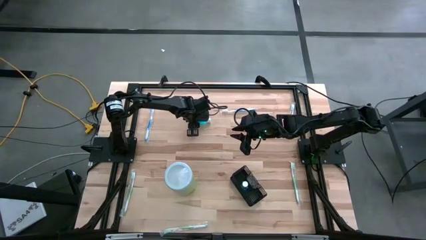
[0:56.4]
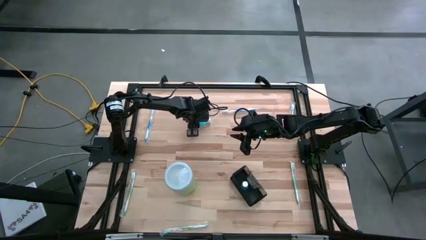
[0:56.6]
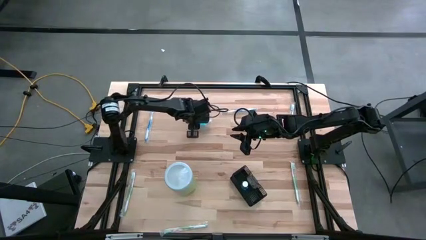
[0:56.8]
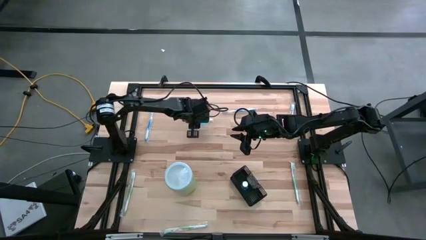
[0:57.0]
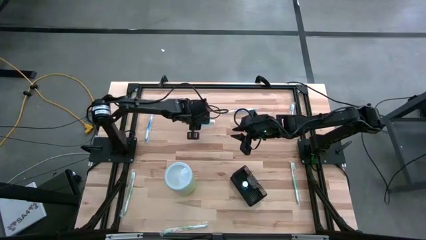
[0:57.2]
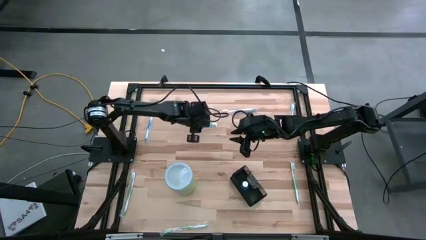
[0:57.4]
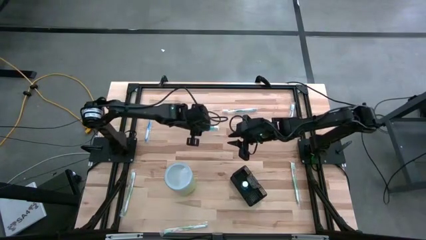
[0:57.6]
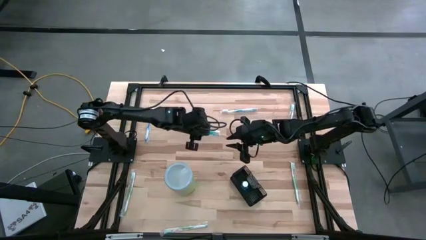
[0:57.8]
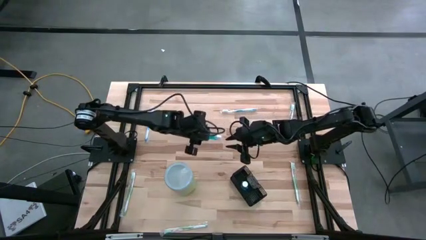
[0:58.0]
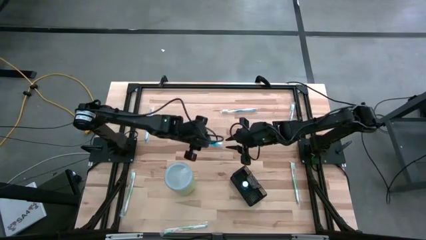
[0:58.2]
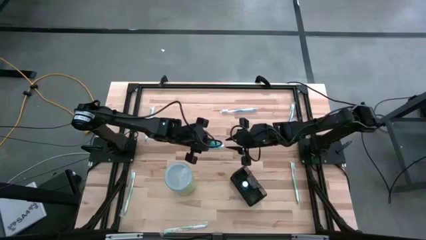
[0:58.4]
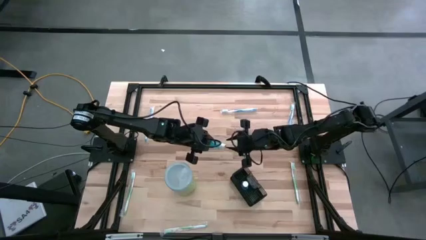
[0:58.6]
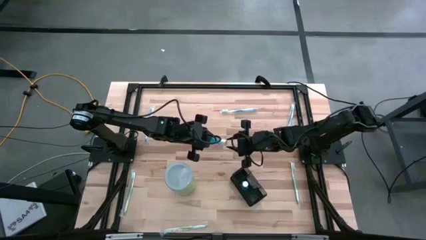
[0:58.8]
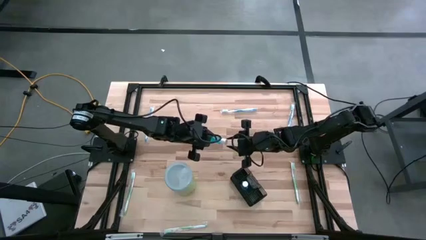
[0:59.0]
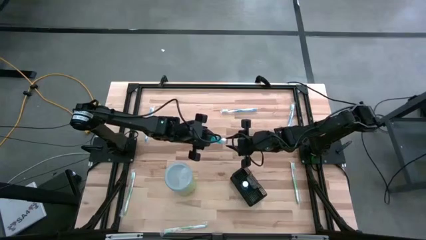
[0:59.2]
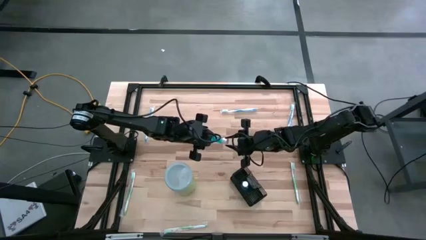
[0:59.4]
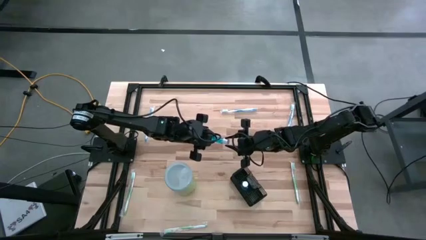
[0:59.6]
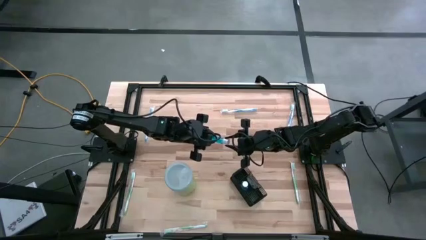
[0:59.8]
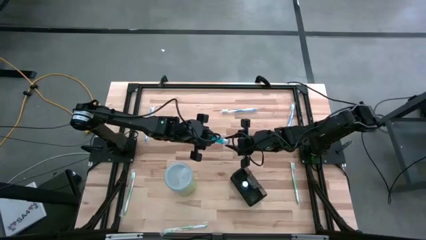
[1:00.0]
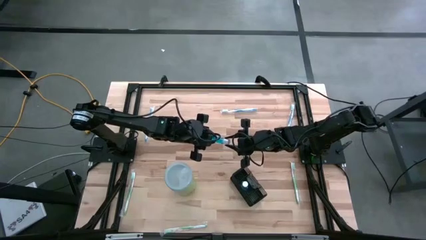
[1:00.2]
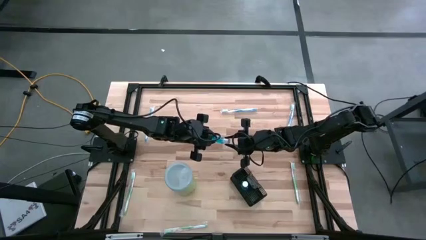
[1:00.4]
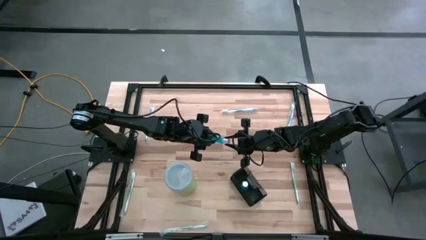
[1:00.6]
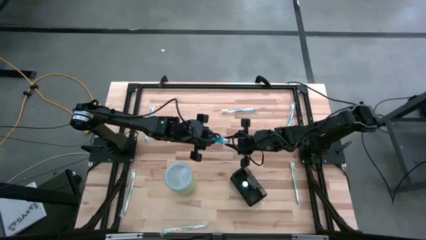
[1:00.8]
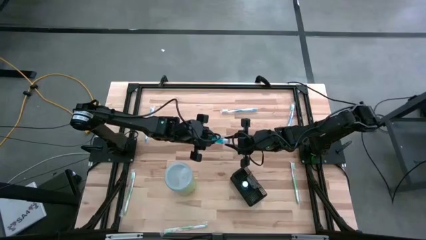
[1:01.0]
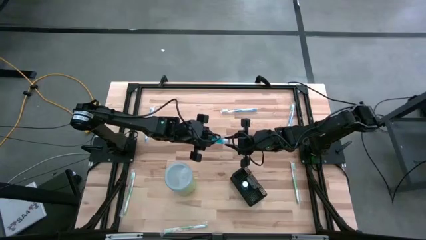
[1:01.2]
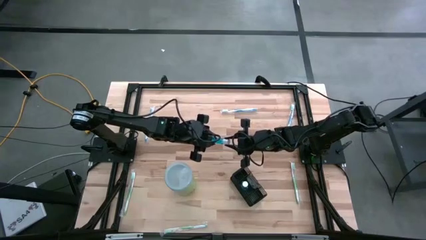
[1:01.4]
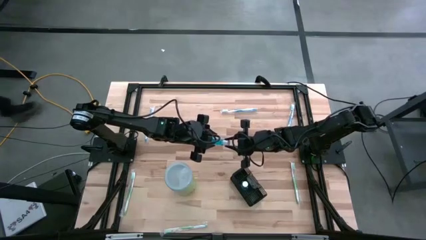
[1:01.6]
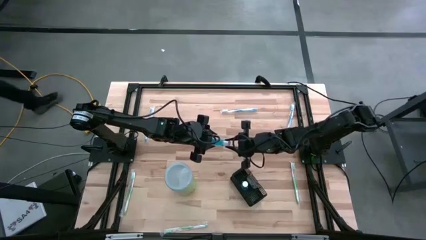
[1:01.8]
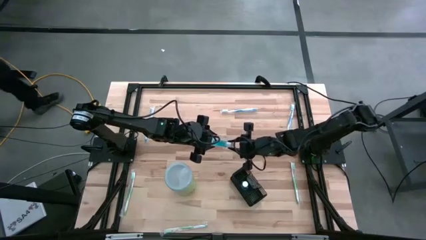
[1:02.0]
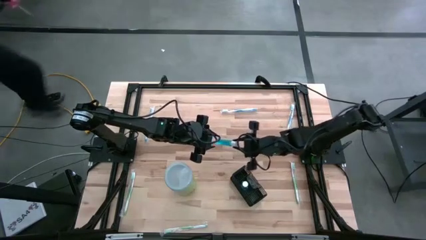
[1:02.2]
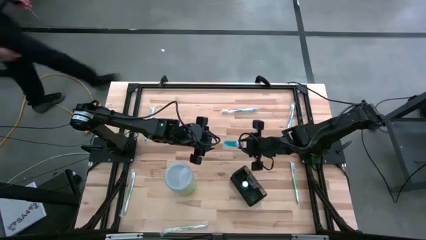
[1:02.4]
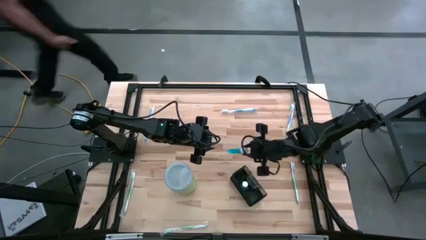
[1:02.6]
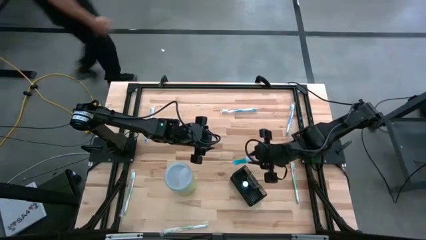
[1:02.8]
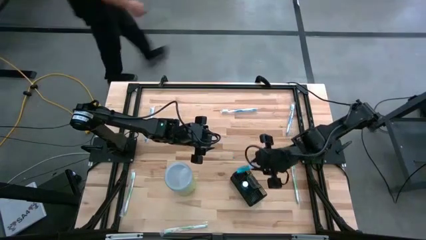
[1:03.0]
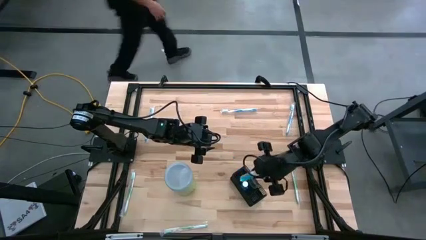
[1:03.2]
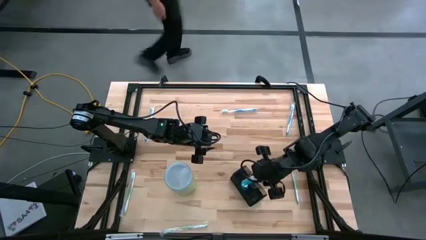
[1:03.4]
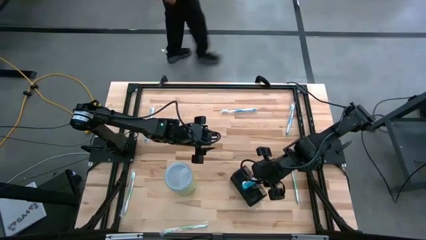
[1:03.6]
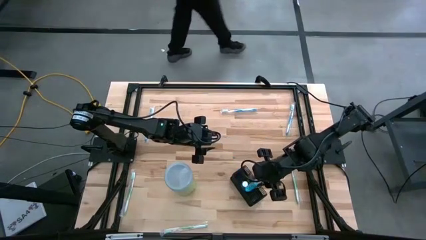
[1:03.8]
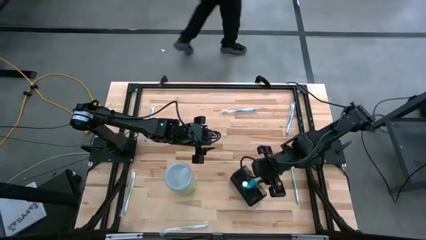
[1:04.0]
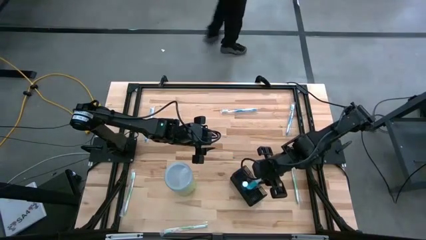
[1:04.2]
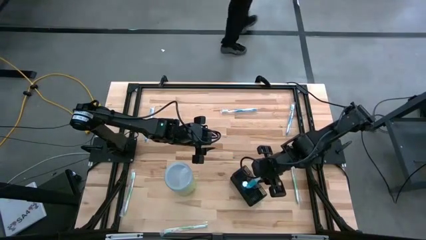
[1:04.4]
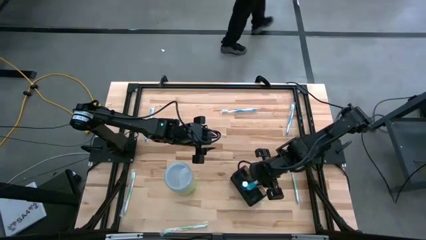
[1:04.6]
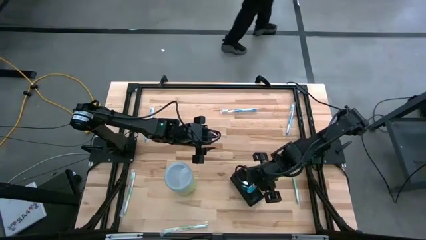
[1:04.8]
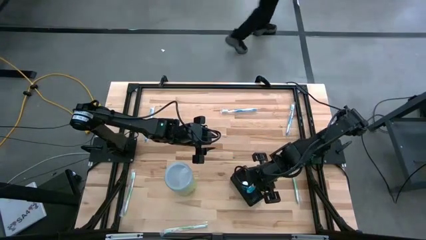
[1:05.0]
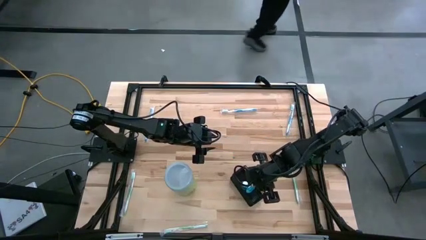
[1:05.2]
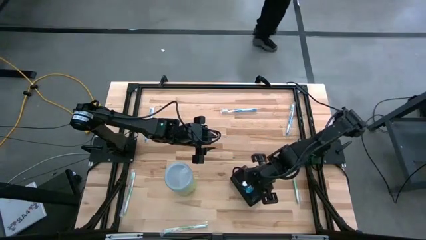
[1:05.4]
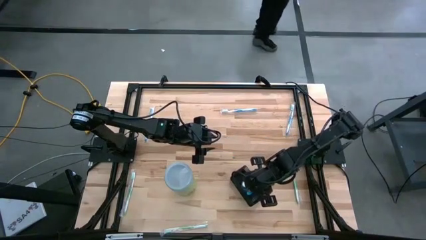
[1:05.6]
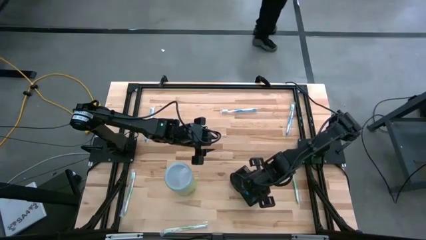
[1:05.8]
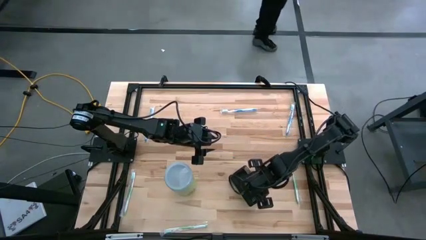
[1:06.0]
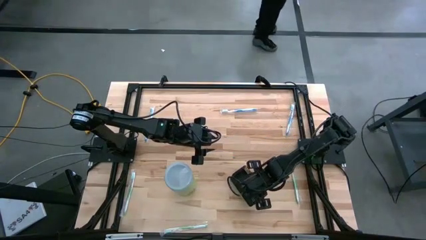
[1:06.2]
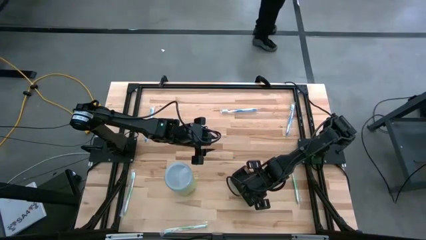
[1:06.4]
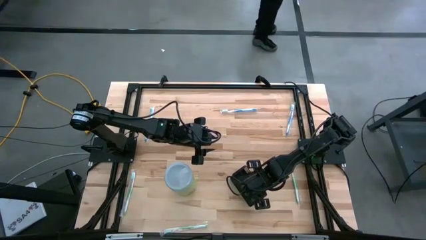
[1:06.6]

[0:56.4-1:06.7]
Task: Pick & Place toothbrushing station
Put the blue mouthwash into the black mesh organizer

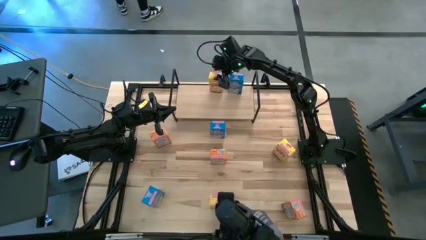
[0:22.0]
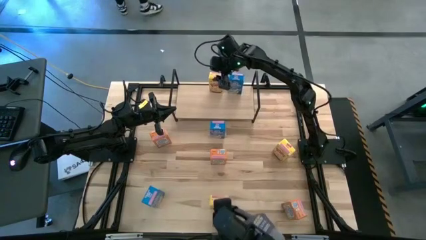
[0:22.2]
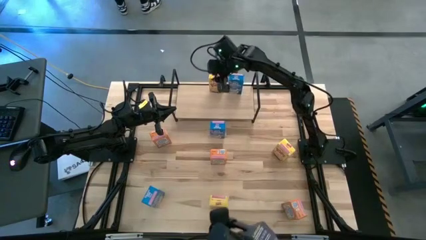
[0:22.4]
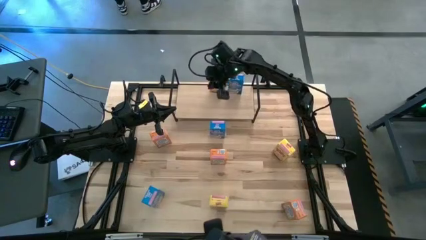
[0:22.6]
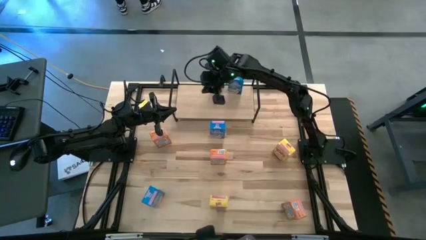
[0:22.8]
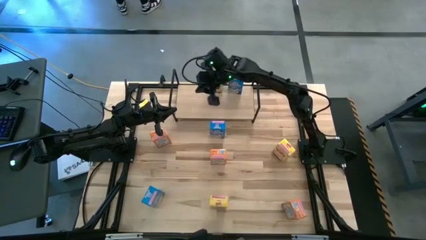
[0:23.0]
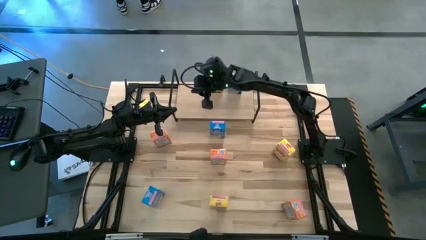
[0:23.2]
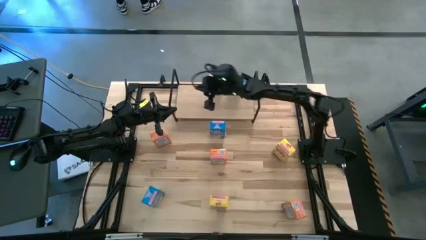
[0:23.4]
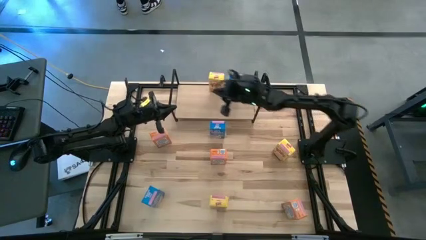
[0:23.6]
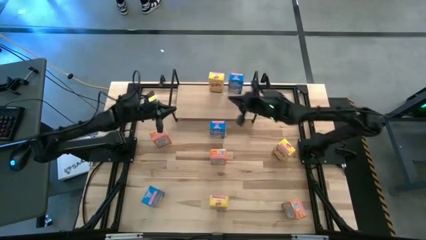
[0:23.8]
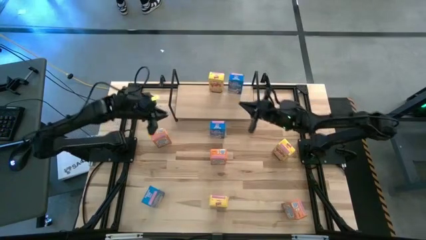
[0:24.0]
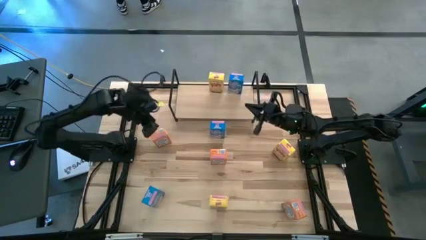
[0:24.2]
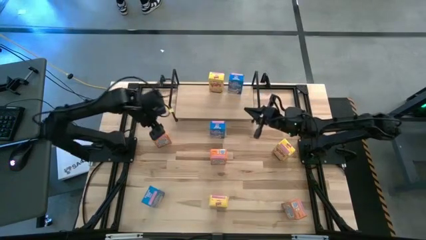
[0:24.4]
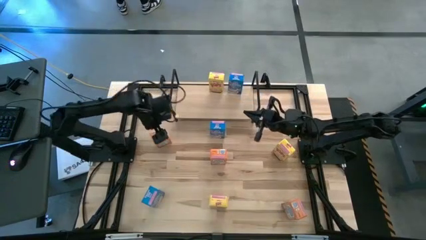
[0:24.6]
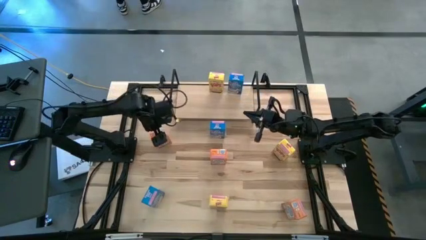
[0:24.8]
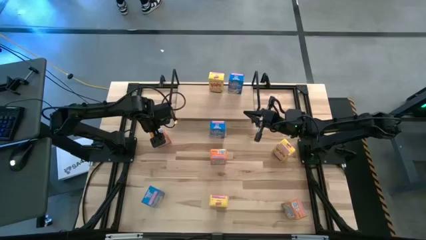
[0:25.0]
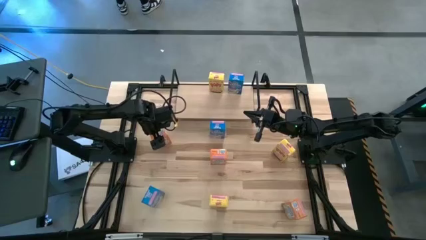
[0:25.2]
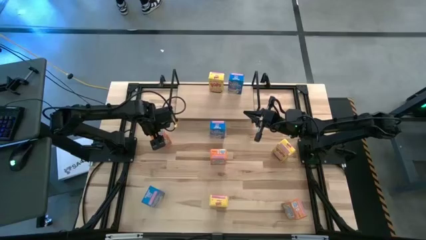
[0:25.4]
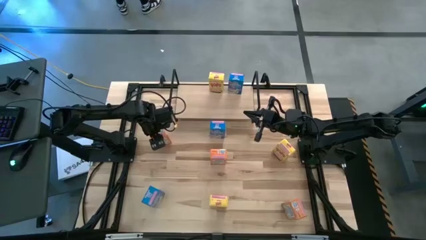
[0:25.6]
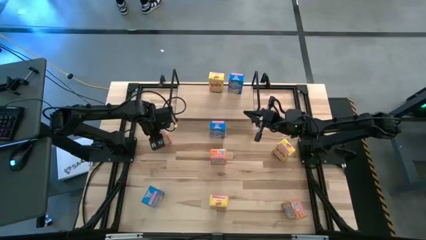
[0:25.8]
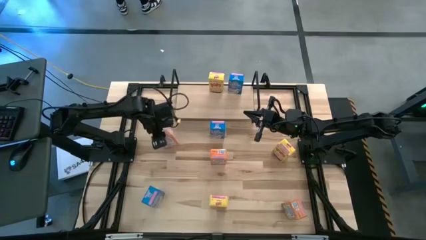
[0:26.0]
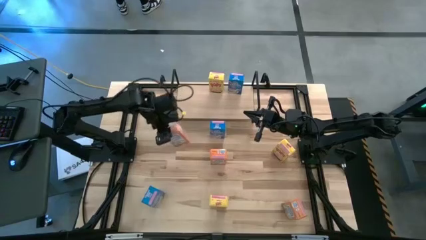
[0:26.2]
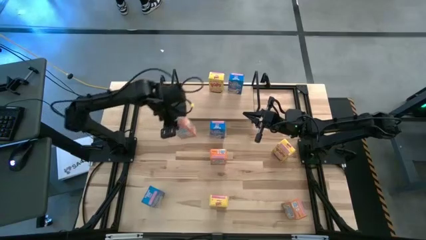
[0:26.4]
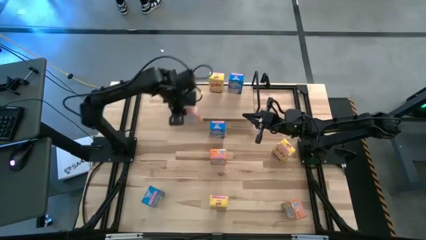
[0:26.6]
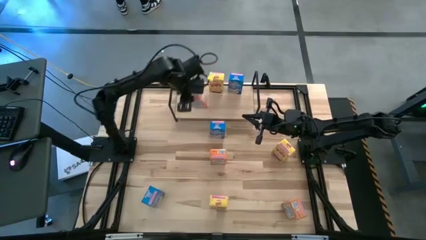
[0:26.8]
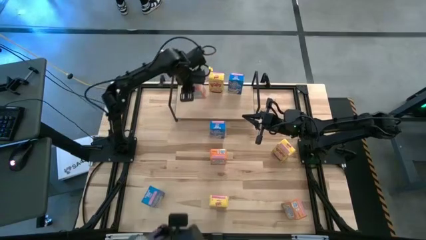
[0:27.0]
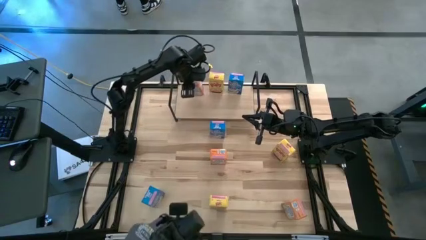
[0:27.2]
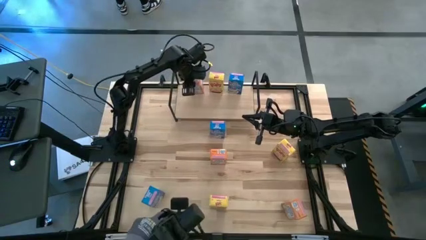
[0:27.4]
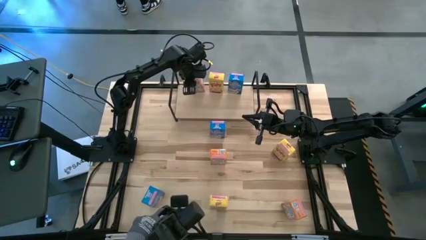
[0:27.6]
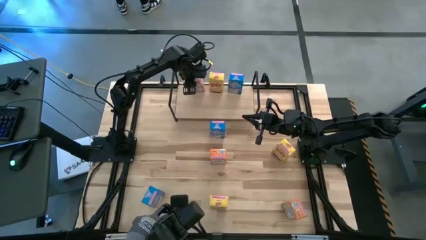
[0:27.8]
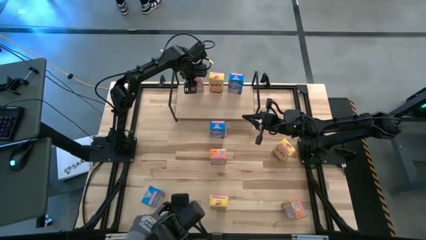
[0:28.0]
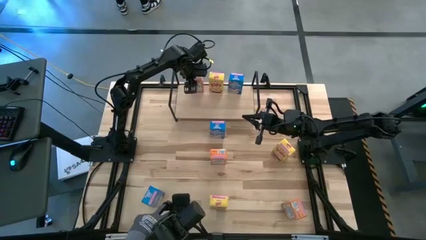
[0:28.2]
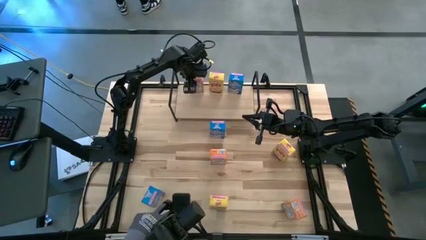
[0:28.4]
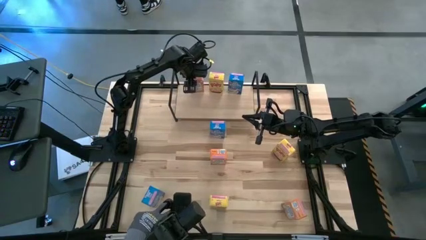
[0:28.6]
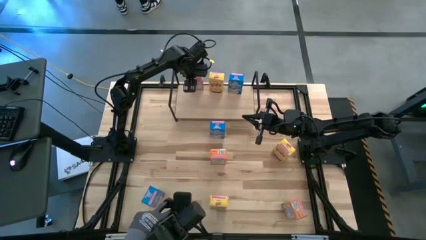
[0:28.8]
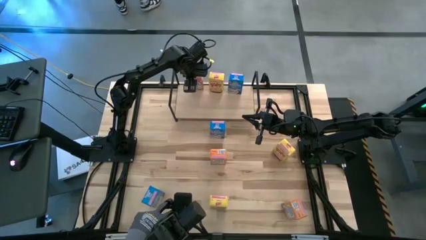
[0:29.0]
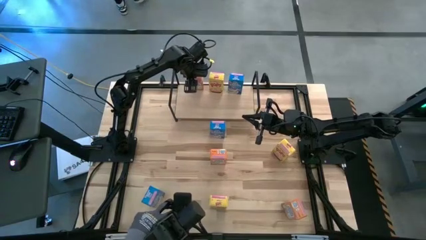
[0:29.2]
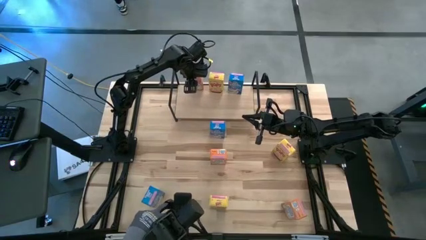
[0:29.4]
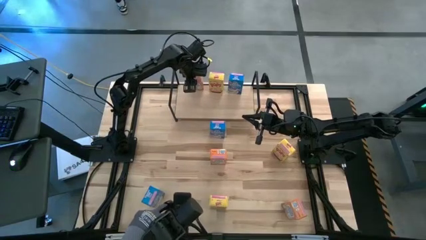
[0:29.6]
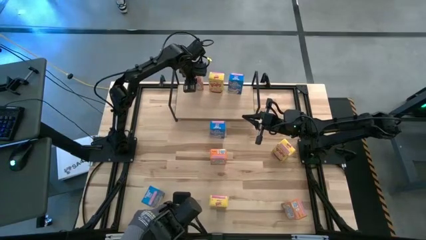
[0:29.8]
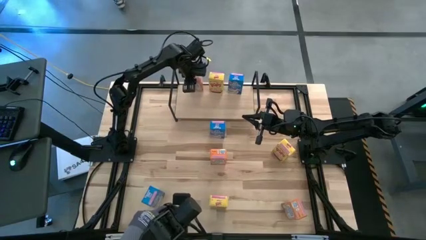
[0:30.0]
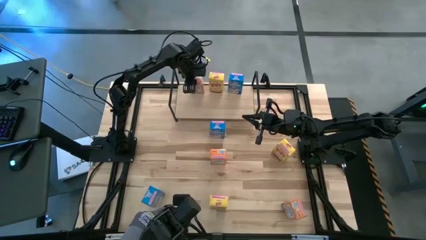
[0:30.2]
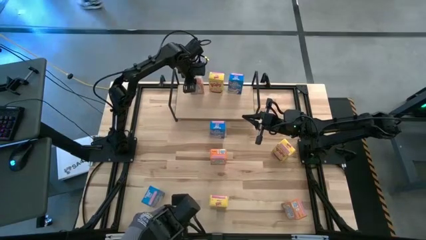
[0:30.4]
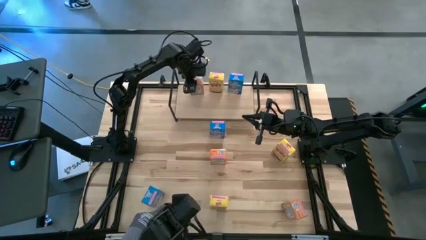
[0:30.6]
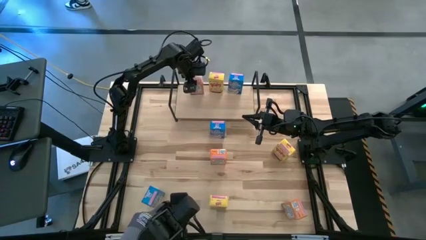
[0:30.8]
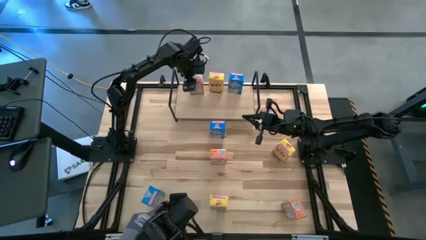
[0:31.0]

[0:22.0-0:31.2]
Task: Stack cereal on shelf
Put the left orange cereal box on the shelf
